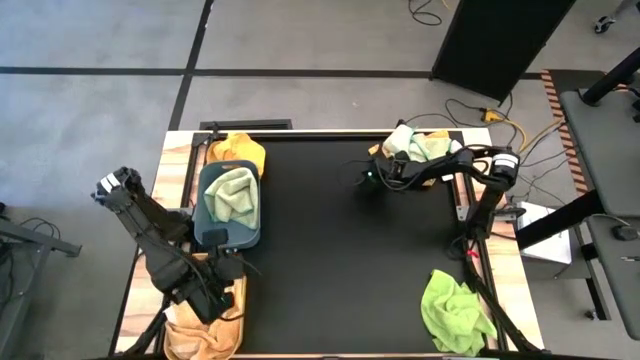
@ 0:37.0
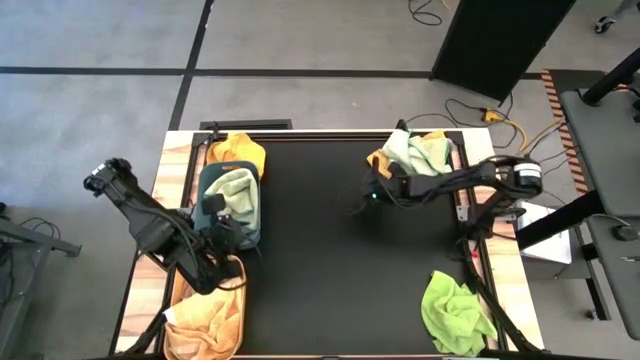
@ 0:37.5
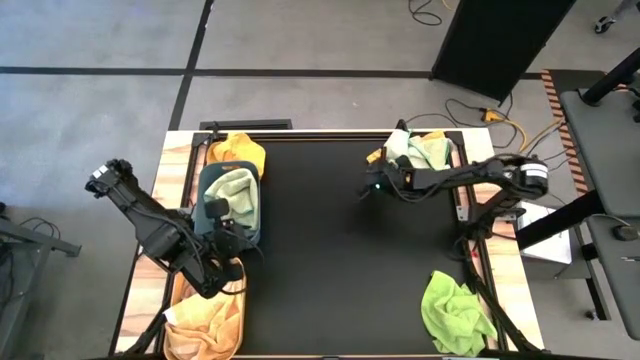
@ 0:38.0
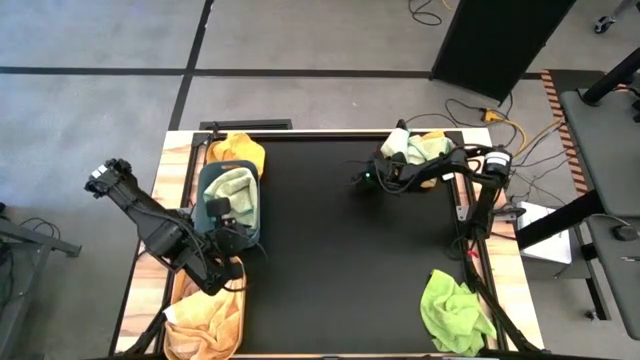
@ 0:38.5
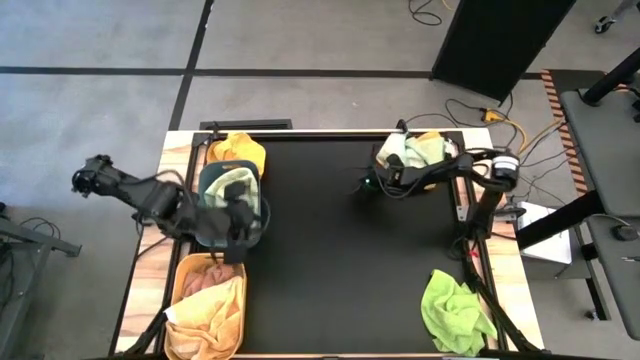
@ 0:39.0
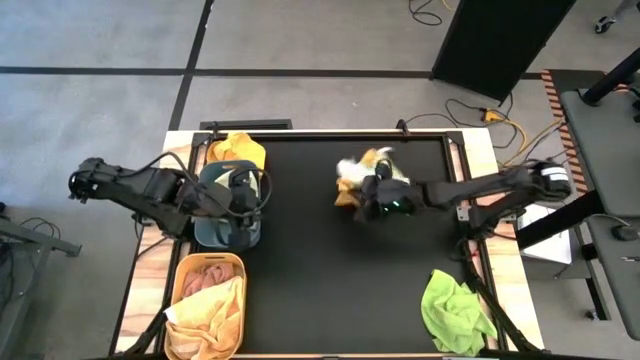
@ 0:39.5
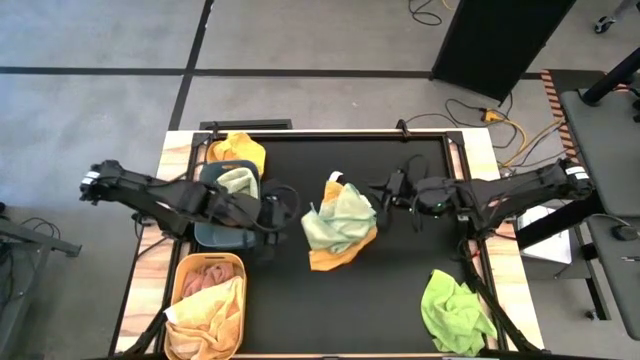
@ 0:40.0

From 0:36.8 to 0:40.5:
Task: Sort towels by color in basket
Put the right yellow kitchen towel into the yellow bin

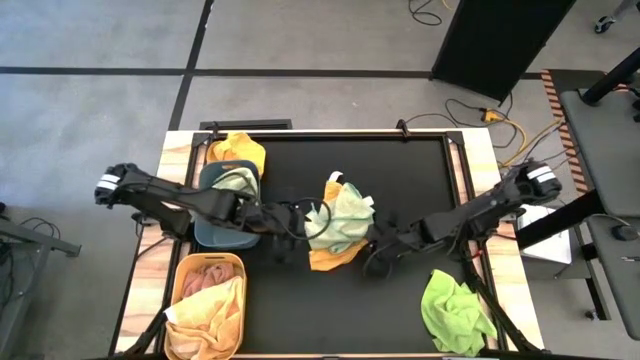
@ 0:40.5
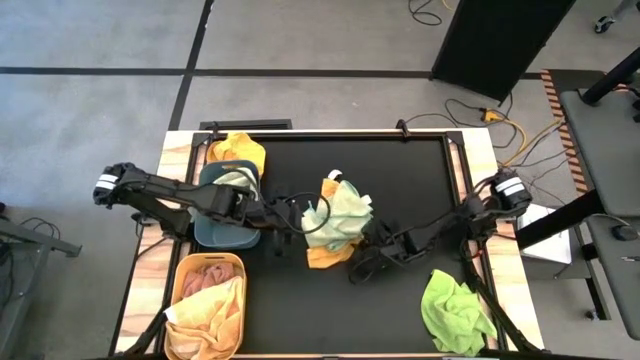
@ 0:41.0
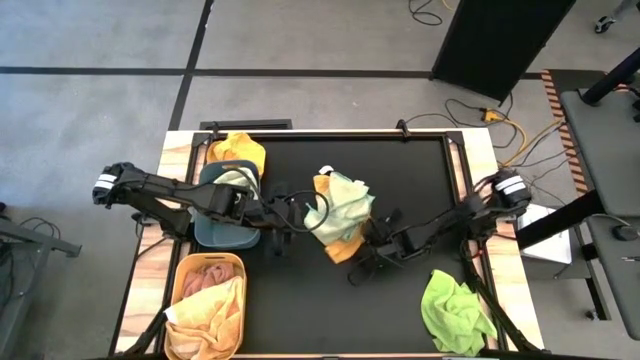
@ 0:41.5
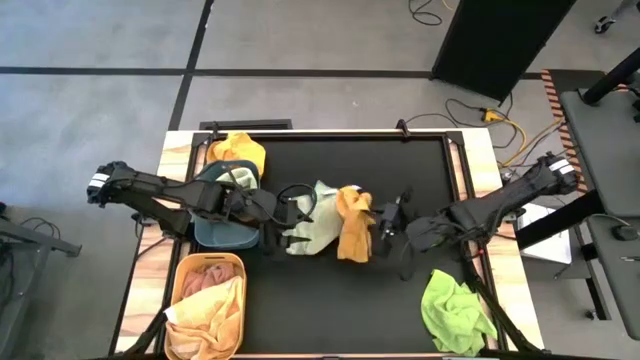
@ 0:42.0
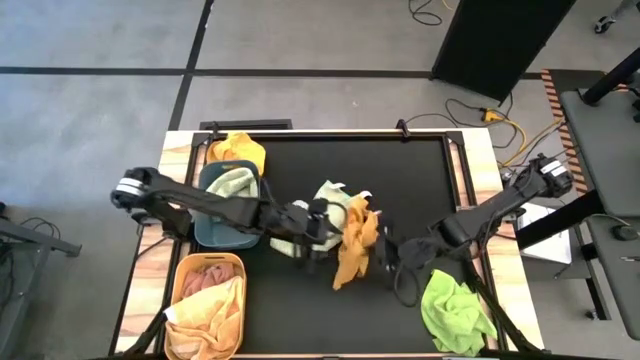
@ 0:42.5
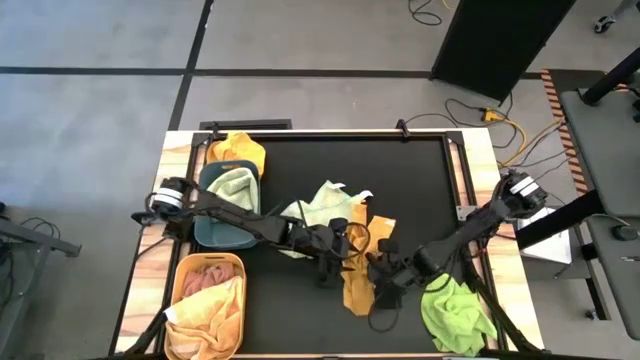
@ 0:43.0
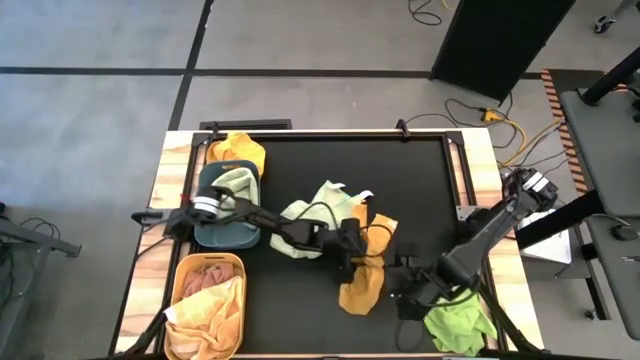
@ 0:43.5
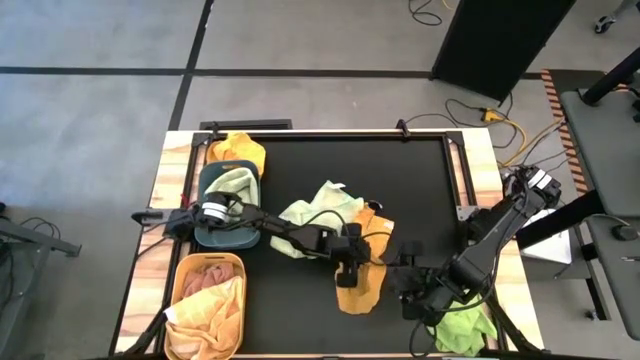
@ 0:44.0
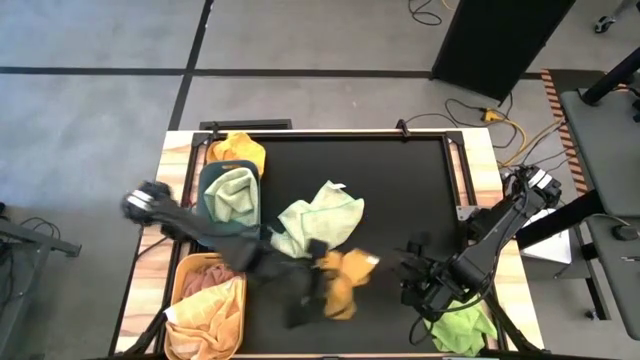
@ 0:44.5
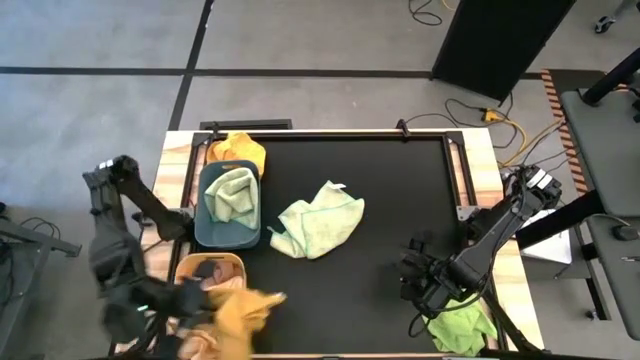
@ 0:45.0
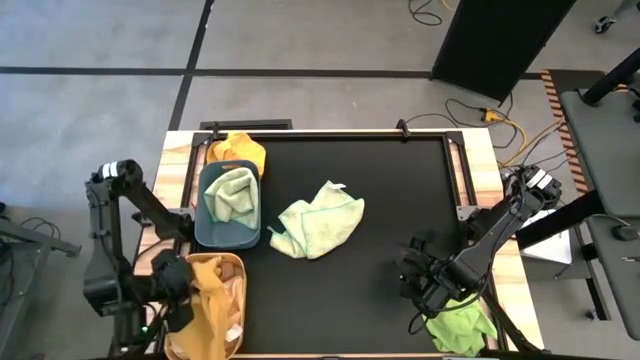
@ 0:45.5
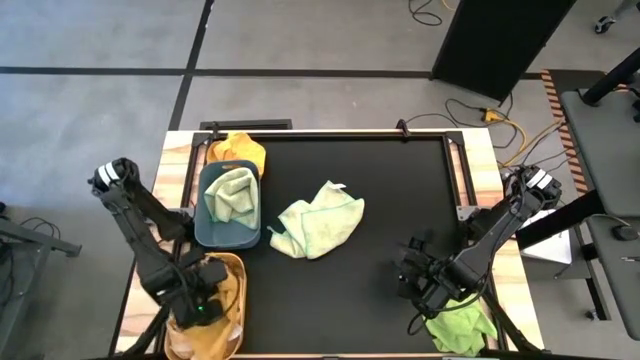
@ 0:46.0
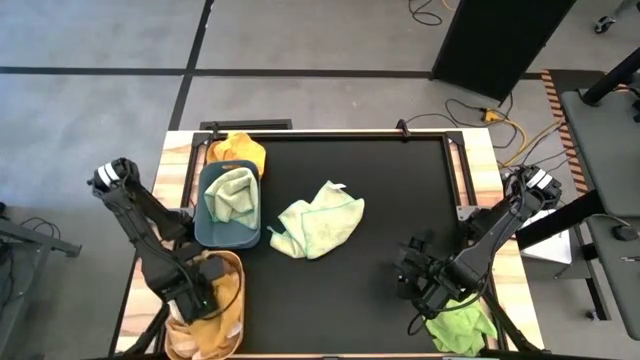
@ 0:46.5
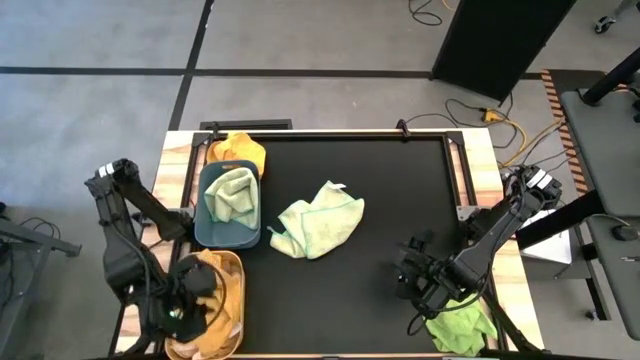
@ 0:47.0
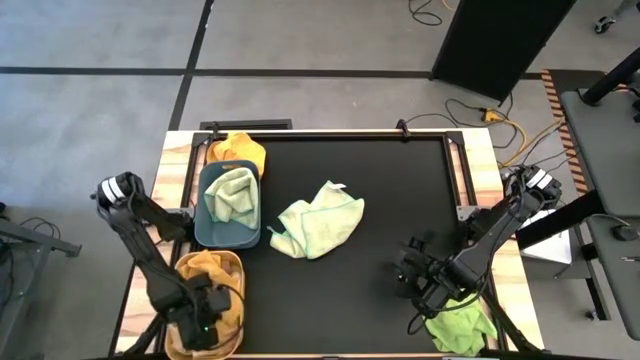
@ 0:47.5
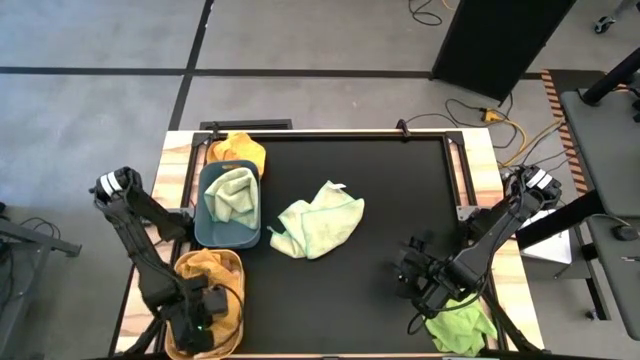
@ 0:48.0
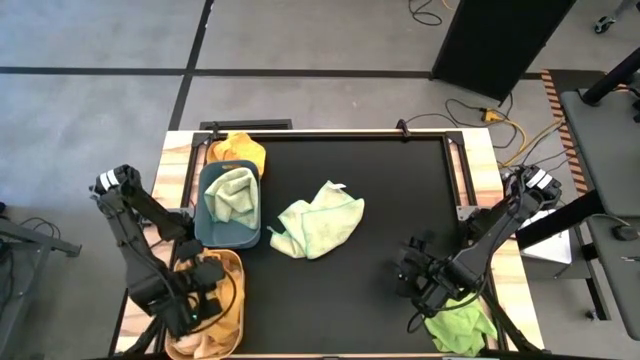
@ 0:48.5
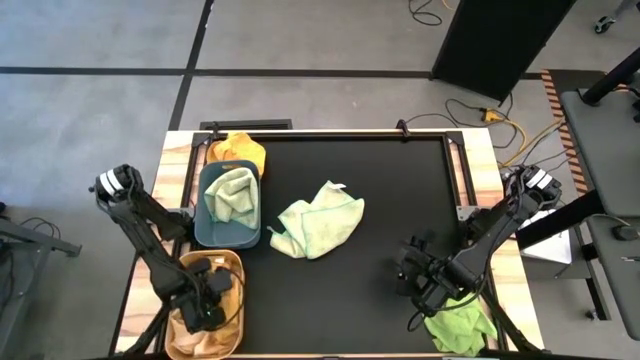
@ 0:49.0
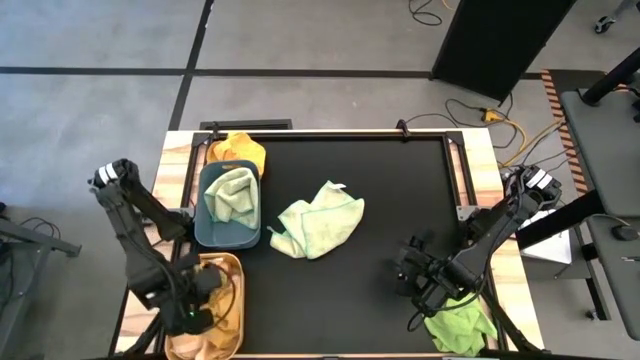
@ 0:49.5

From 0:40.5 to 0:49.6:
Put the top right yellow kitchen towel into the yellow bin

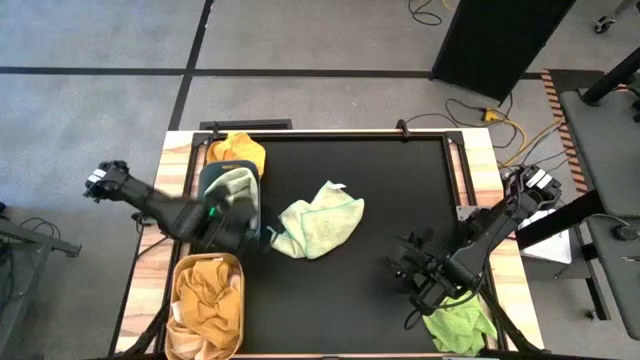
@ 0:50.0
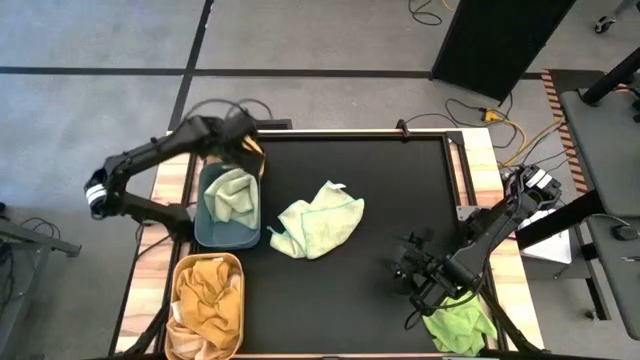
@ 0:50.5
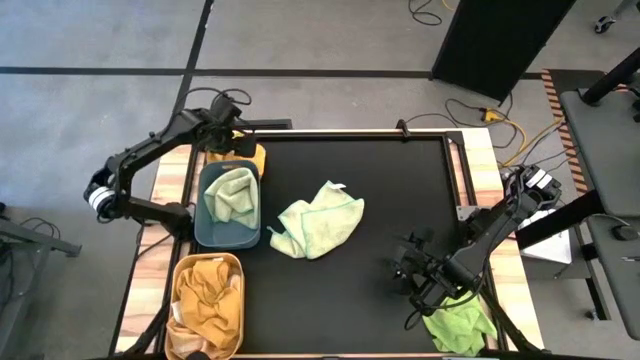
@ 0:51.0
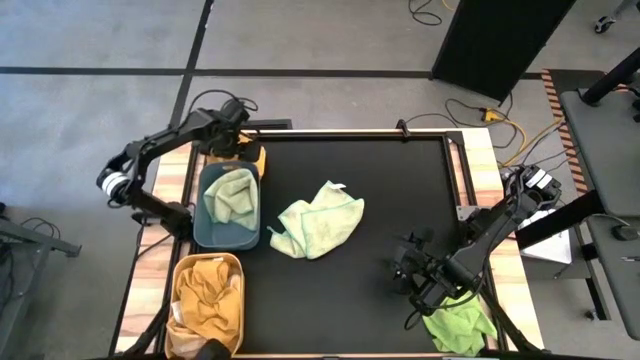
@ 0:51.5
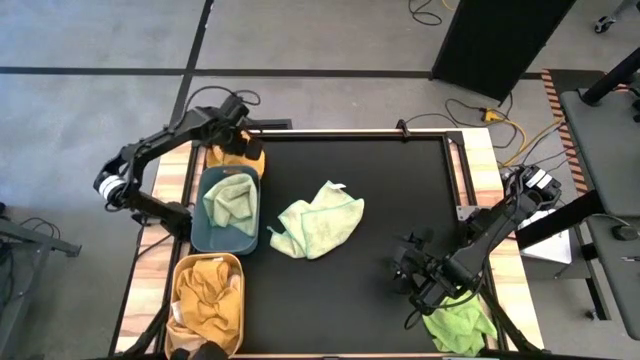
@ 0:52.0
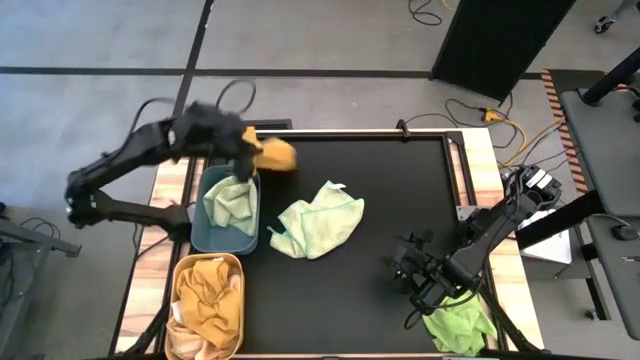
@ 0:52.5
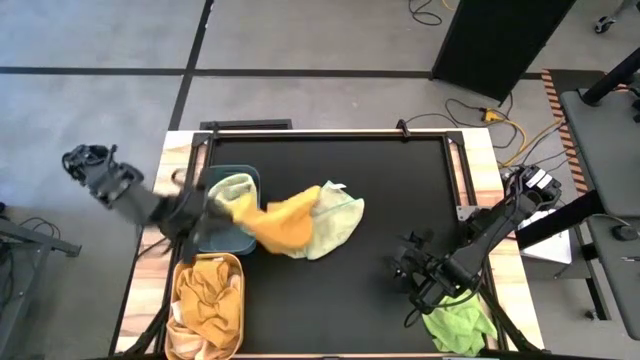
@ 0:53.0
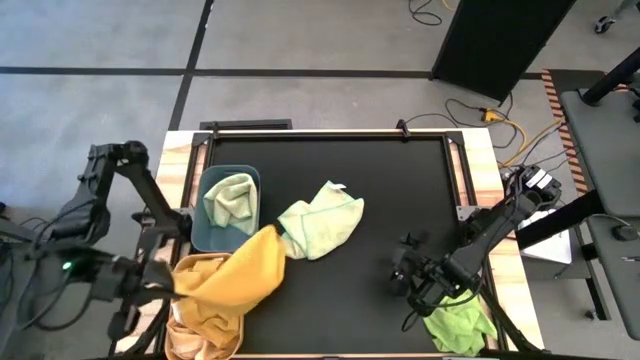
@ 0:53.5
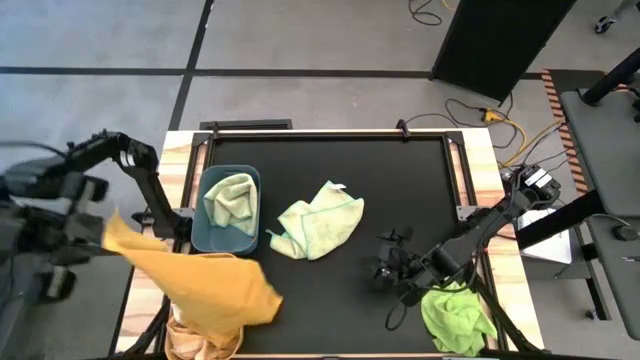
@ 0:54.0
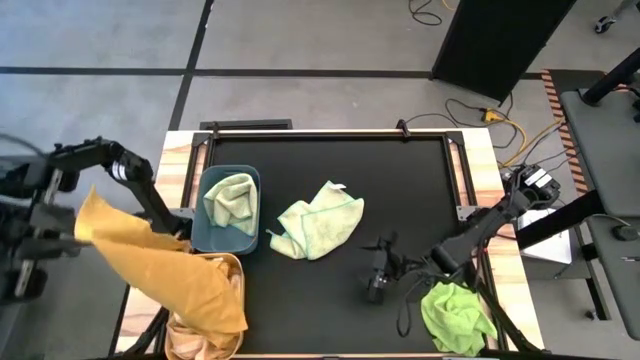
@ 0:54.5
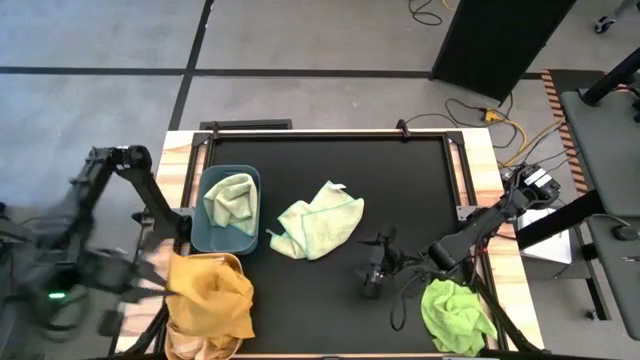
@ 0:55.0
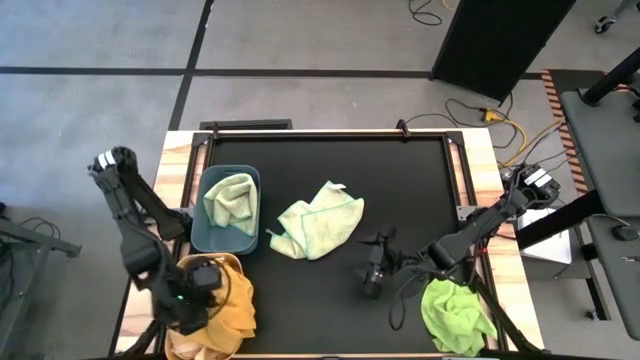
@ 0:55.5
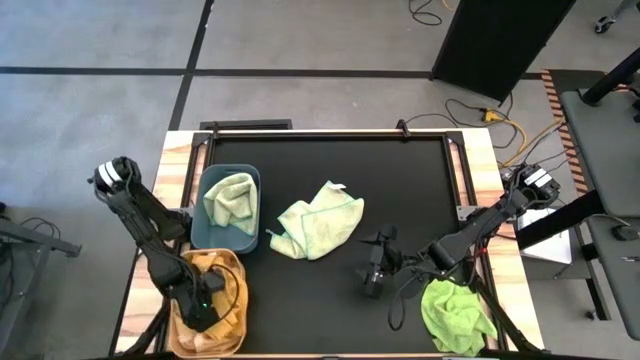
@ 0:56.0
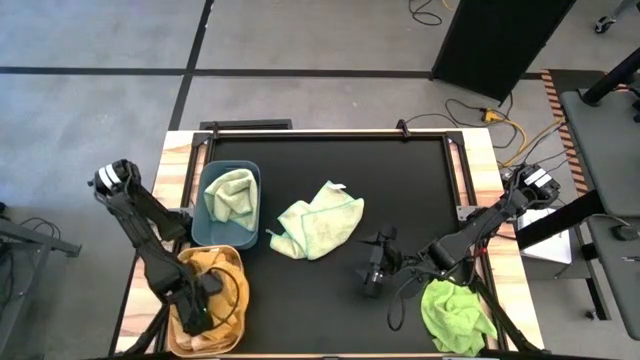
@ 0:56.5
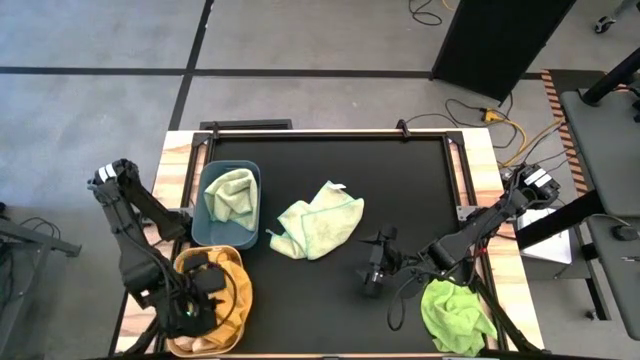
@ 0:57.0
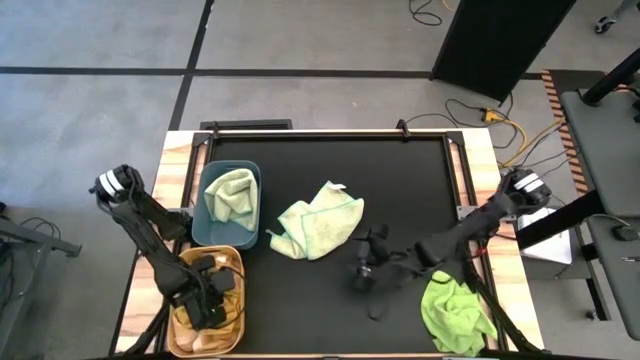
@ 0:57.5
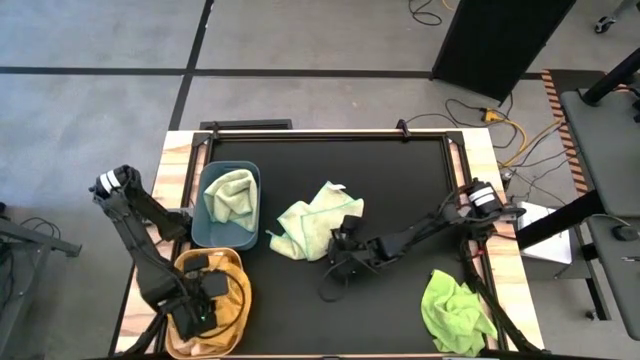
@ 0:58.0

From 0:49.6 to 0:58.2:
Put the yellow kitchen towel into the yellow bin
